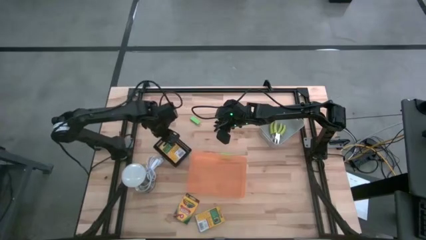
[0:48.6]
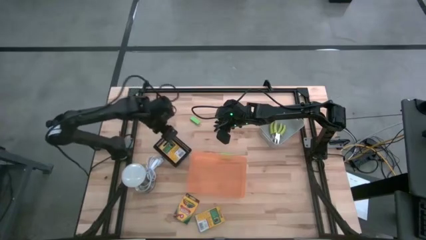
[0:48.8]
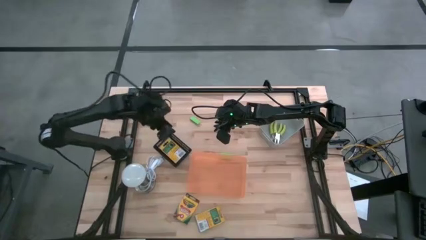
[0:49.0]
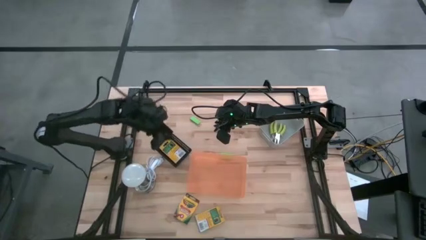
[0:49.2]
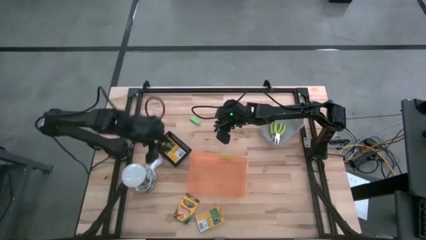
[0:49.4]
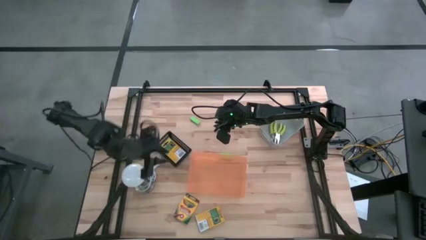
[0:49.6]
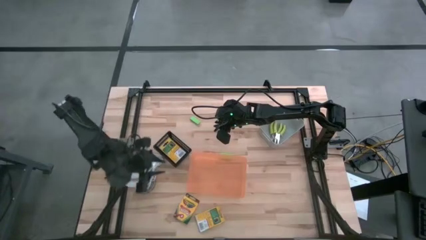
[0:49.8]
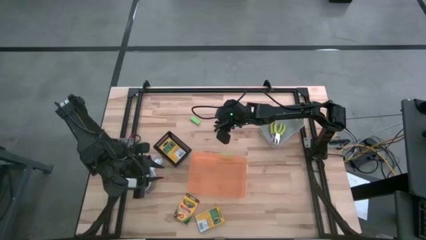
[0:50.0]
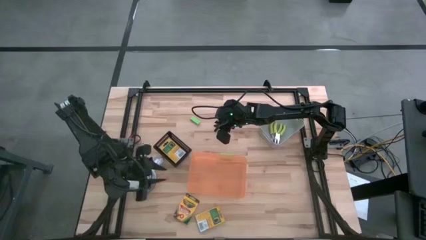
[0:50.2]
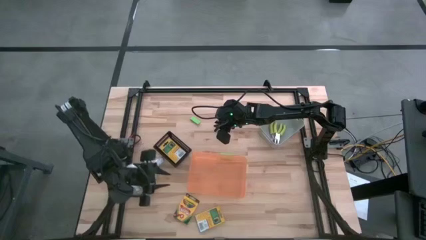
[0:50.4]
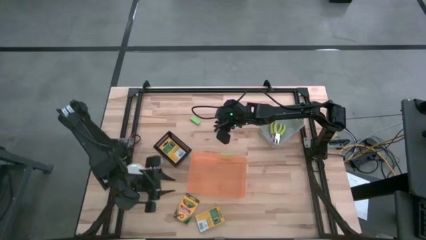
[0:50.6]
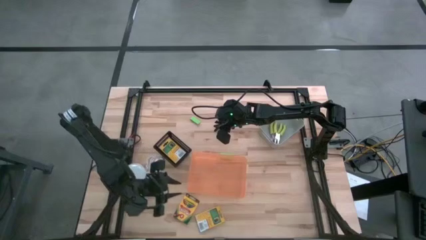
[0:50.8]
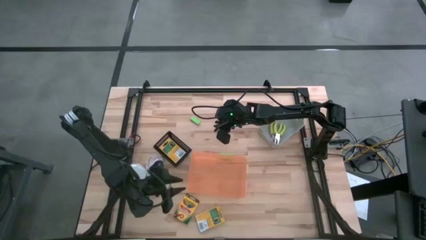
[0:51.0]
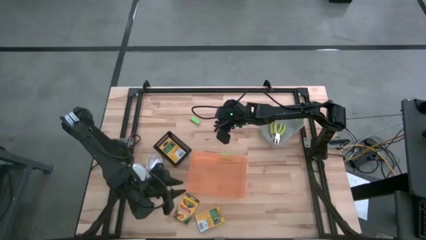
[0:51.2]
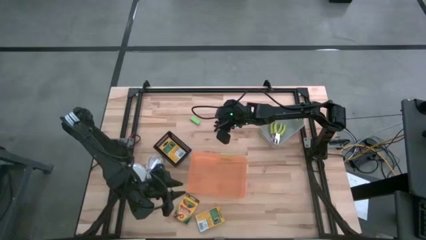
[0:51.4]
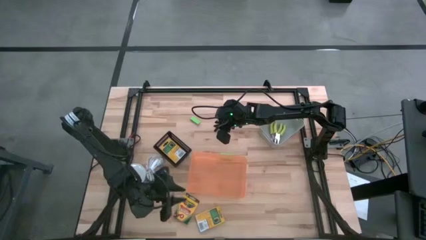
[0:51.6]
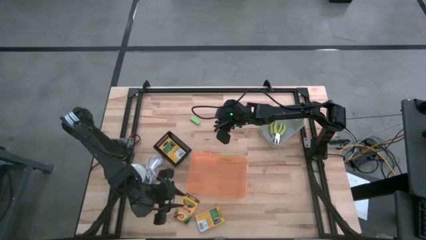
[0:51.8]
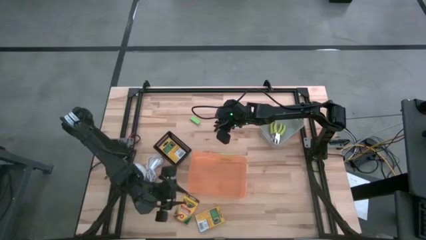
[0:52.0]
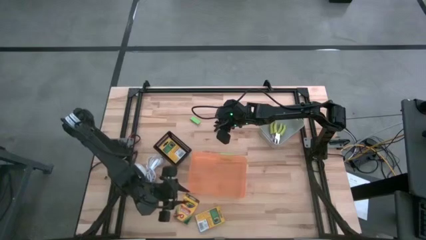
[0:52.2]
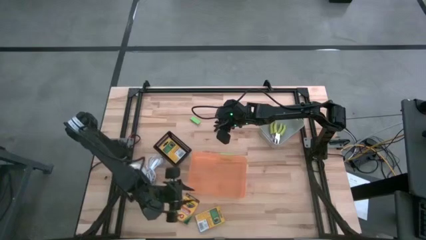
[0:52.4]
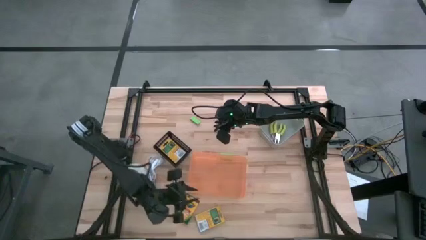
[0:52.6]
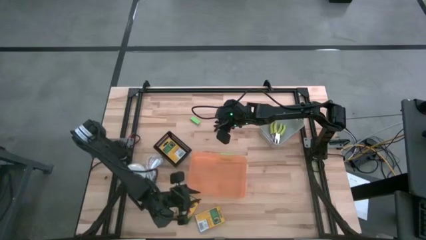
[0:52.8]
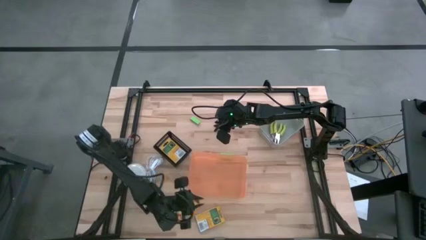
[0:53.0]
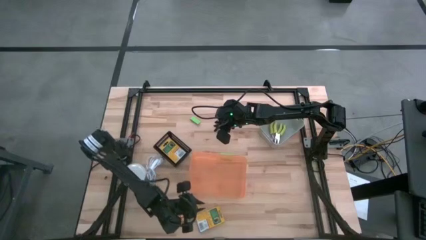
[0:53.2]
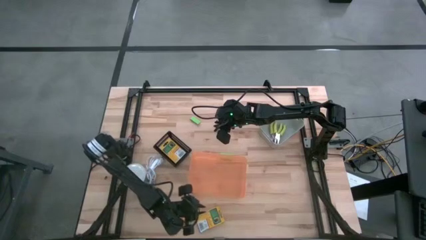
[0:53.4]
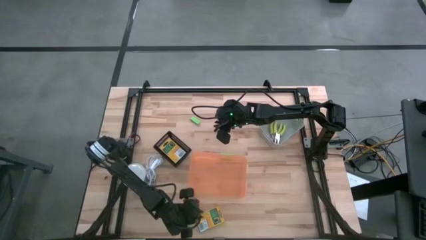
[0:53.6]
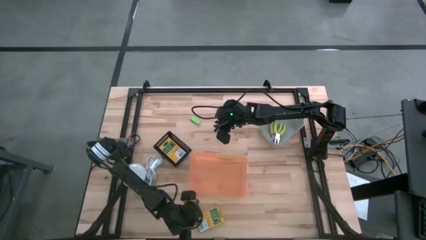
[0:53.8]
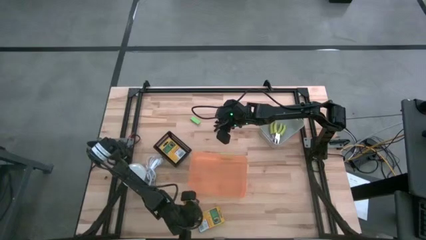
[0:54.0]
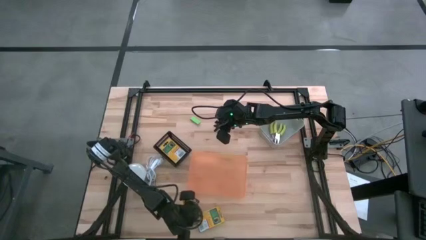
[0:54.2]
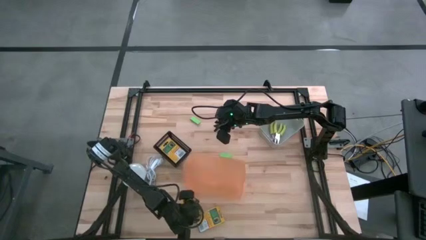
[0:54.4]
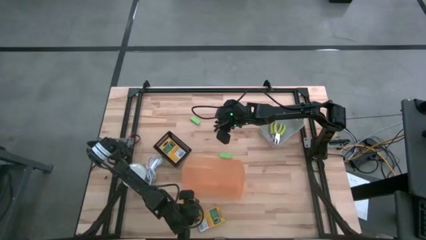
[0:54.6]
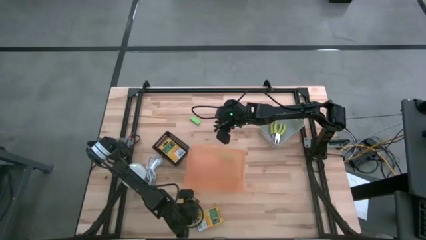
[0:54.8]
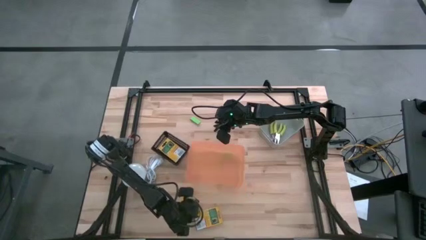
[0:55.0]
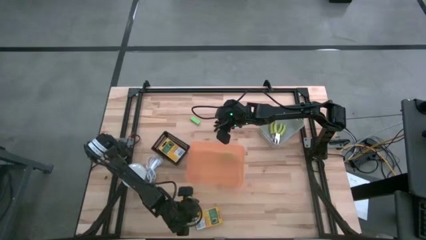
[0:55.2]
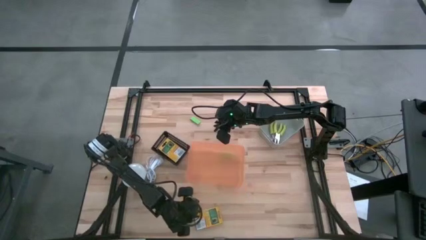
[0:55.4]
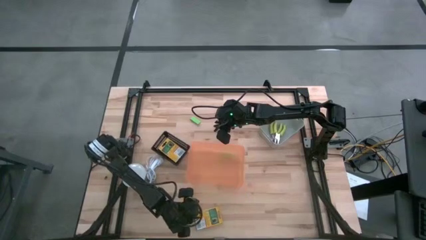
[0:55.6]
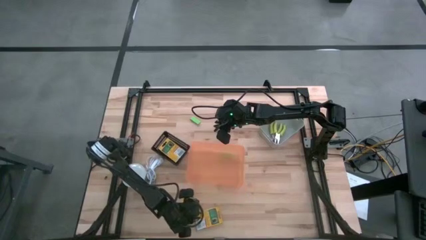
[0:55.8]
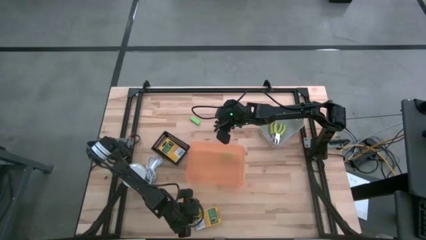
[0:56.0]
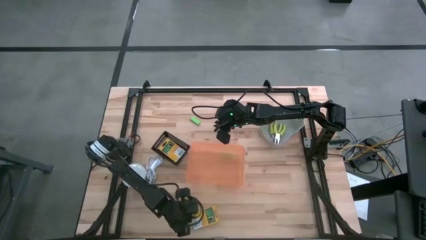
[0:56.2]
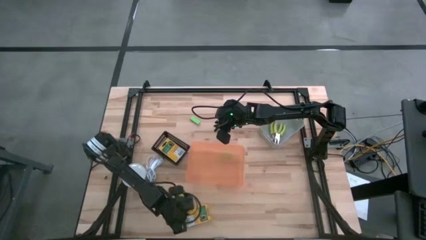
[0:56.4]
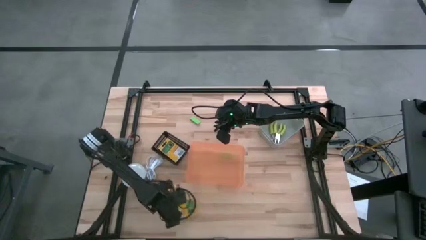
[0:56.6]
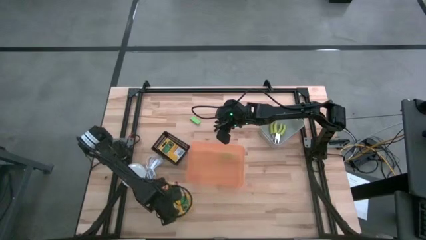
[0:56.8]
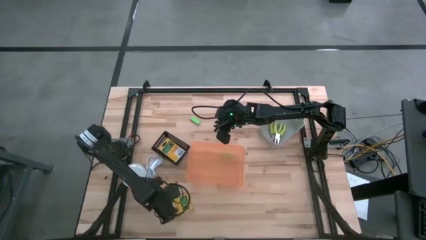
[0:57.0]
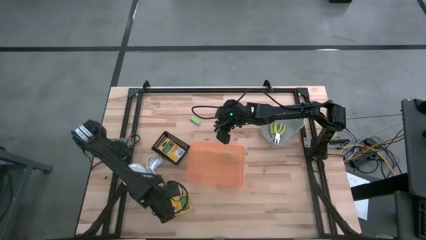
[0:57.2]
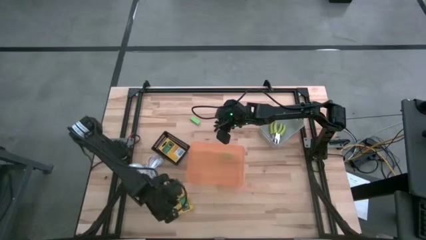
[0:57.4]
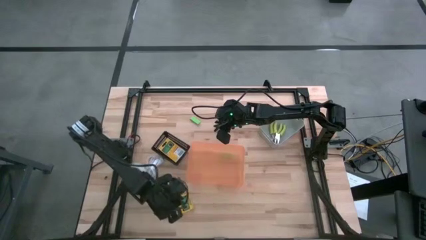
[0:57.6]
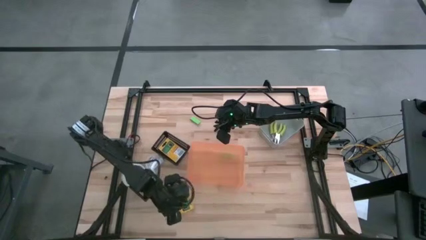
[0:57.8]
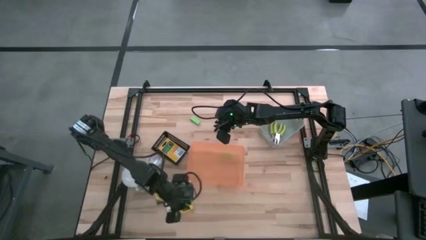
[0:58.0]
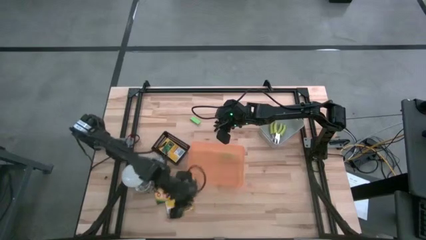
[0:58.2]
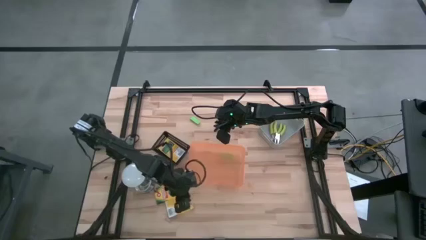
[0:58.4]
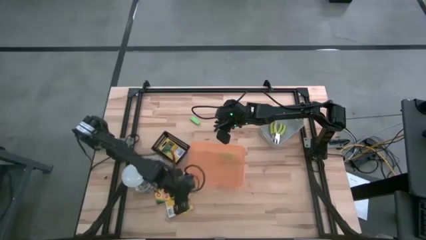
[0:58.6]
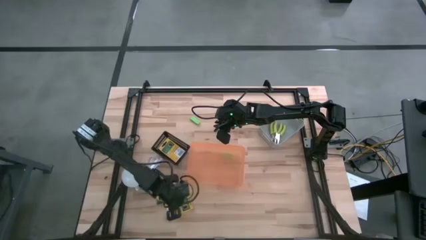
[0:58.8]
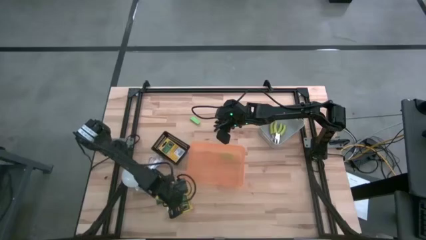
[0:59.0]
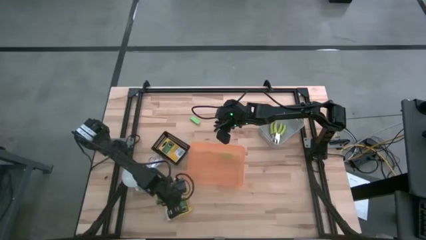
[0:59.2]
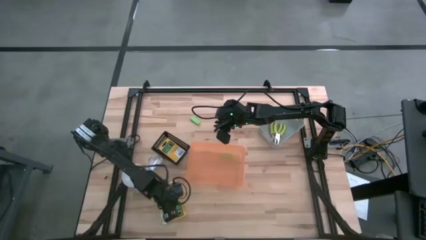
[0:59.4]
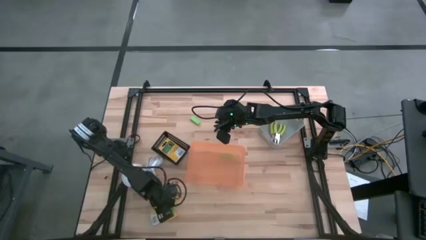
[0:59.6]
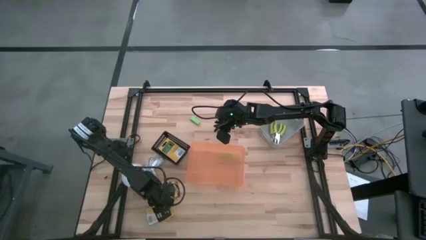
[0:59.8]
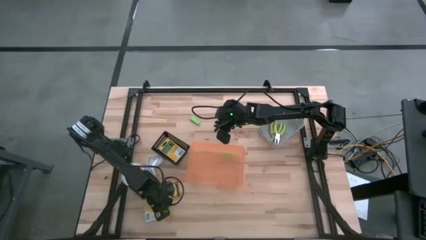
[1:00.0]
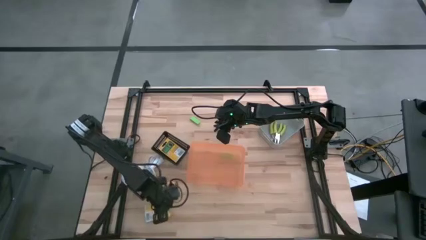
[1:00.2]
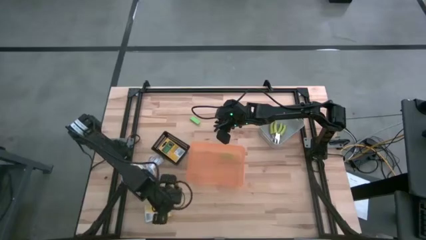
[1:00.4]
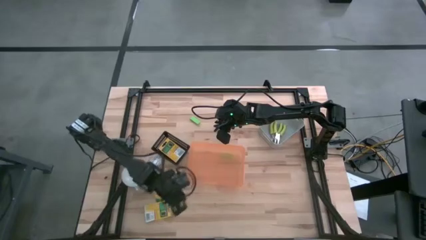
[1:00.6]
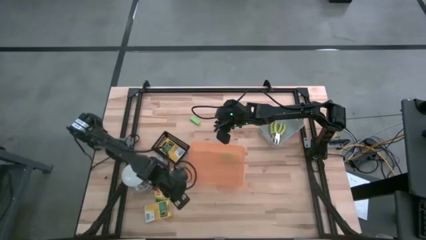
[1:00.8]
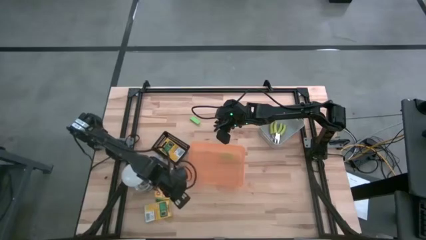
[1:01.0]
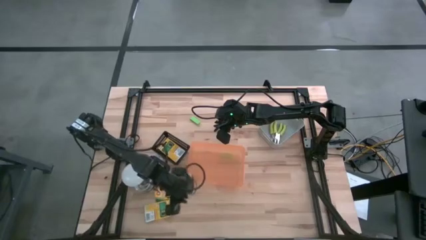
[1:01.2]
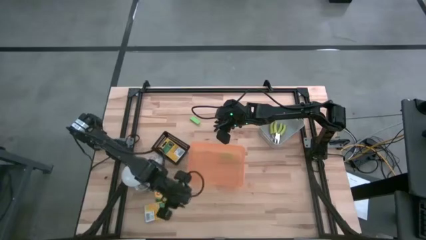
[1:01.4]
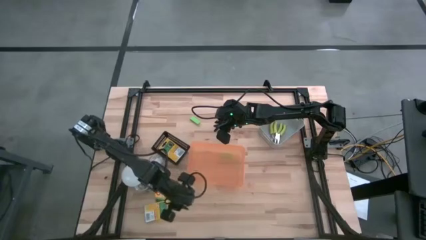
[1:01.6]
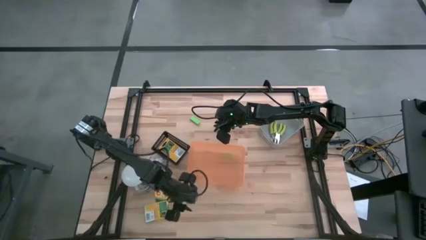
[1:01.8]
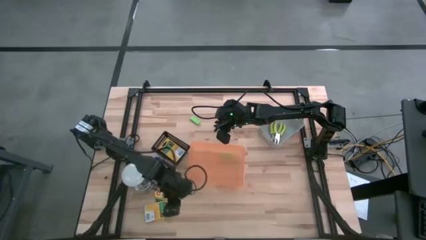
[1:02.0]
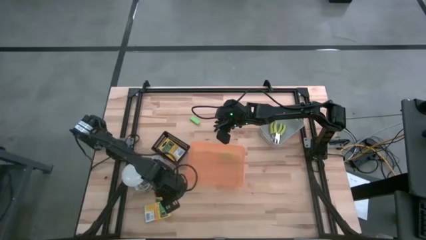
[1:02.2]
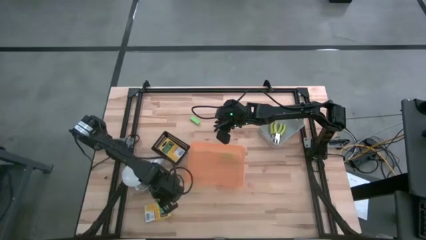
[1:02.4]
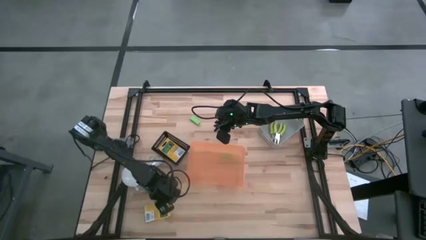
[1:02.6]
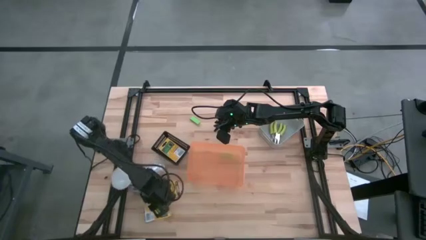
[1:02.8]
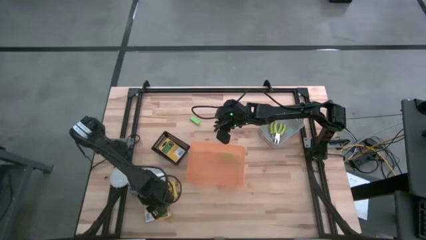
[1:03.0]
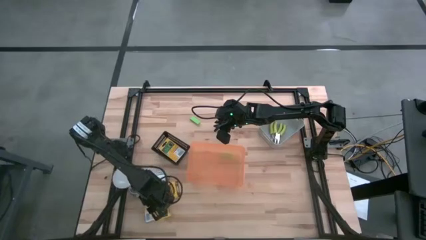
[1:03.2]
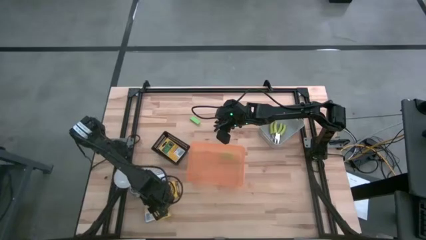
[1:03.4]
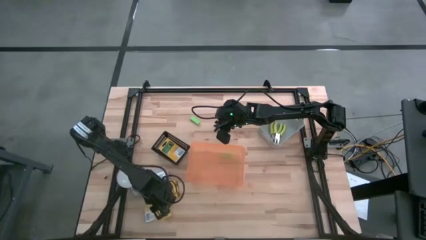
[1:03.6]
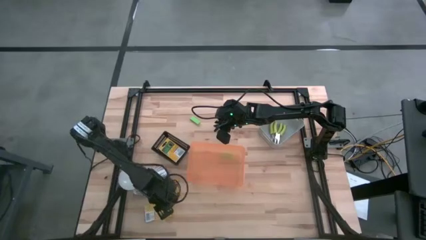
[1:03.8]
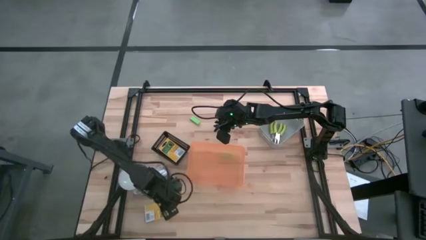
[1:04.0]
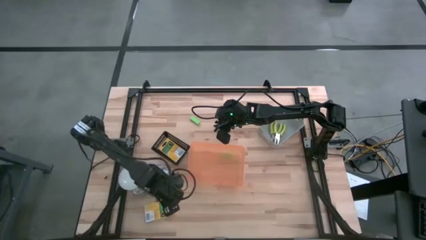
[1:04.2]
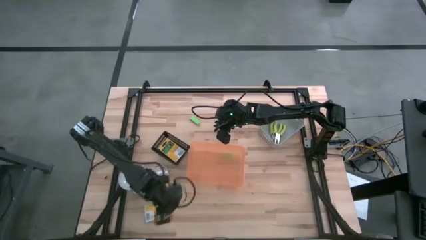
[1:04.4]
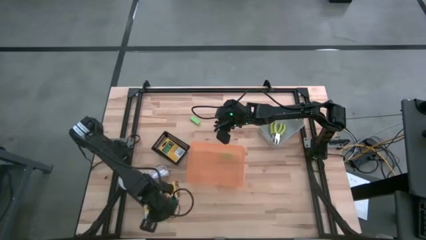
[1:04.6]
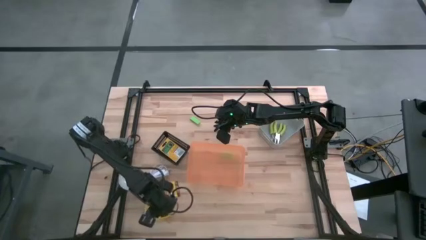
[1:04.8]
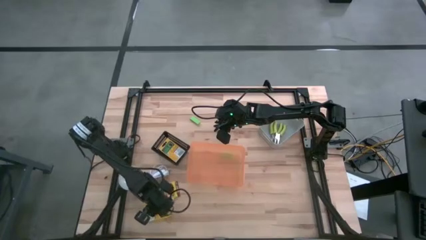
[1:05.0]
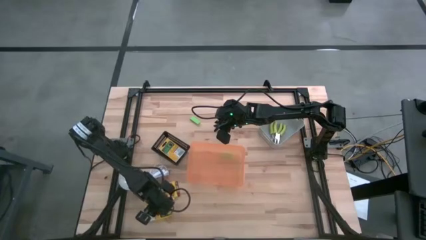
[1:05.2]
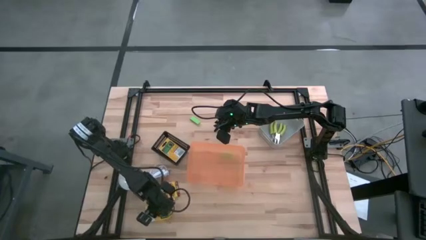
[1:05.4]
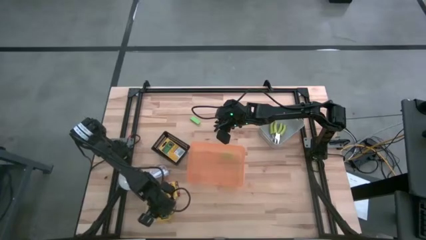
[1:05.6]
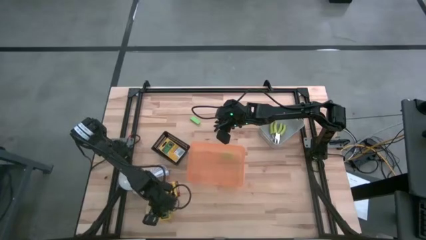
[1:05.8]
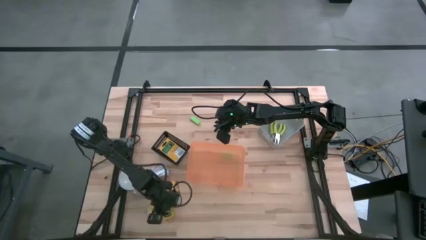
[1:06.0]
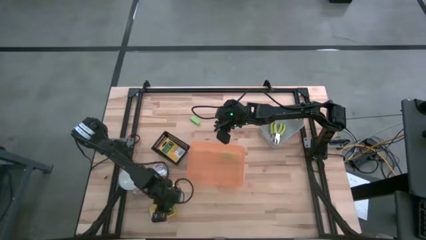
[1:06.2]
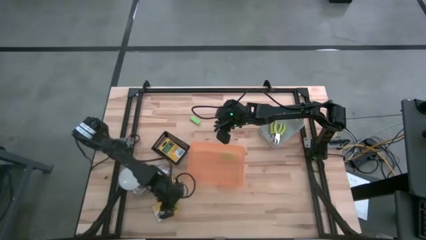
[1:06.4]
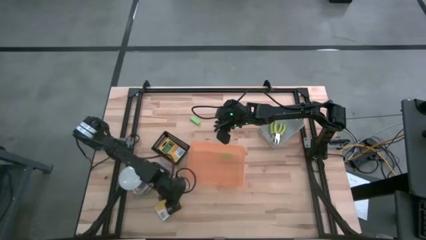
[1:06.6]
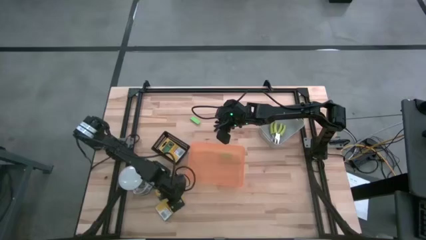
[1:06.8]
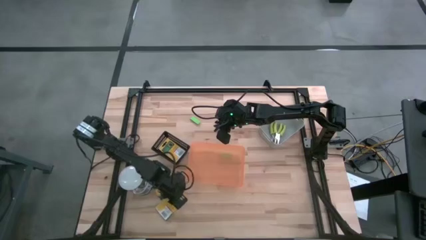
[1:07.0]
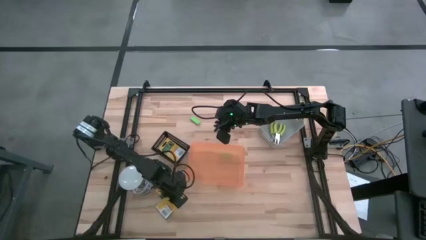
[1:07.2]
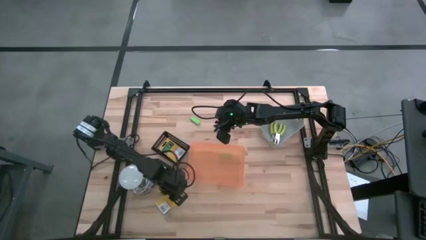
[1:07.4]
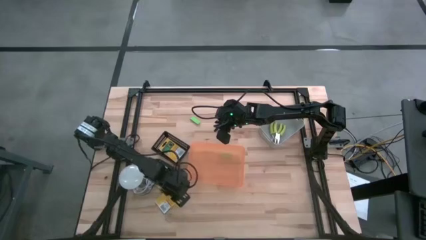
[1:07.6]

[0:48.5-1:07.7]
Task: Pick & Place School Supplies
Move the right yellow crayon box to the bottom left of the table
